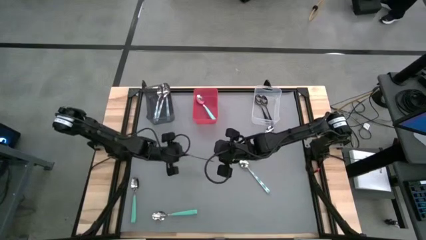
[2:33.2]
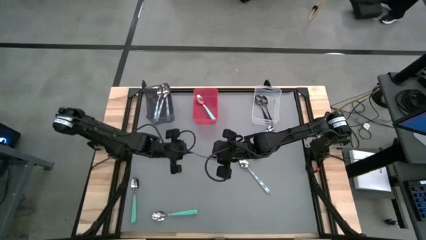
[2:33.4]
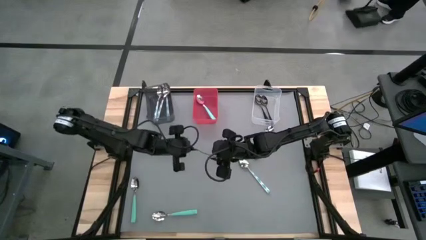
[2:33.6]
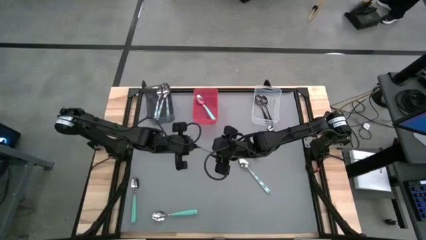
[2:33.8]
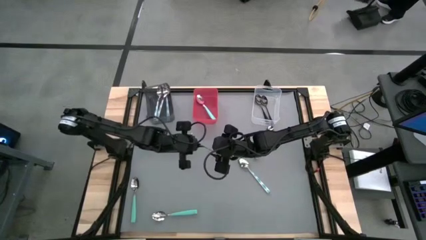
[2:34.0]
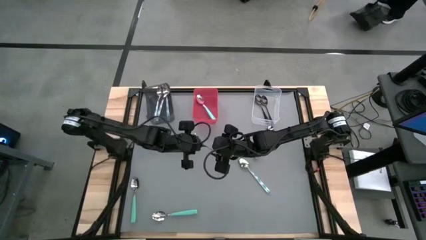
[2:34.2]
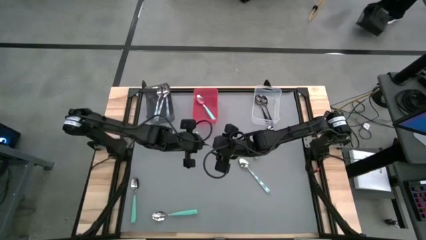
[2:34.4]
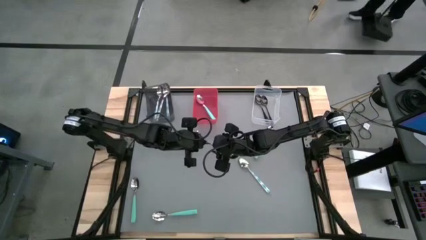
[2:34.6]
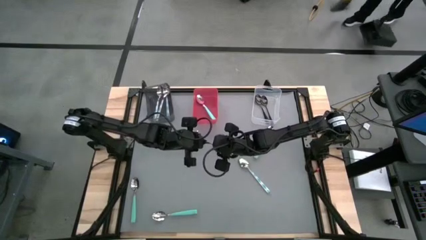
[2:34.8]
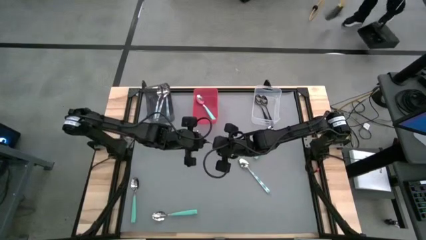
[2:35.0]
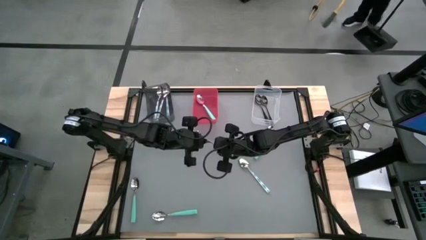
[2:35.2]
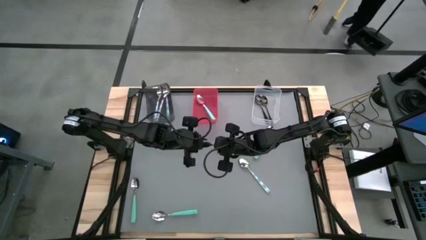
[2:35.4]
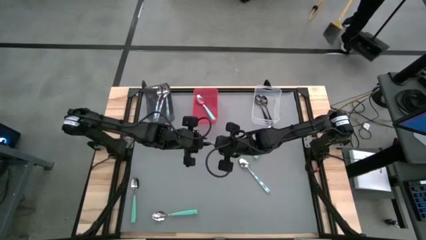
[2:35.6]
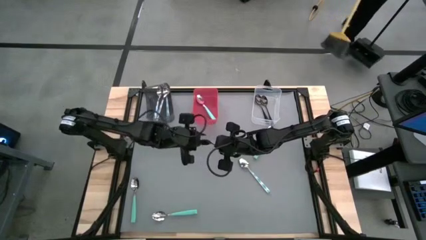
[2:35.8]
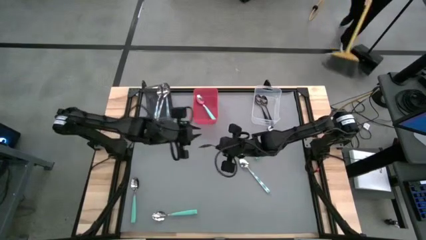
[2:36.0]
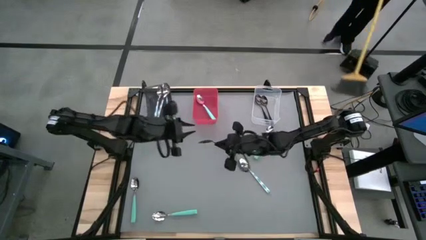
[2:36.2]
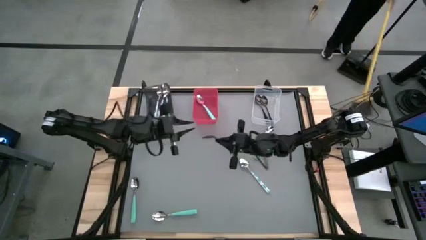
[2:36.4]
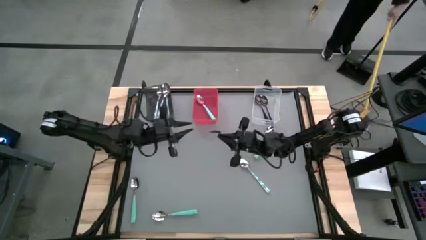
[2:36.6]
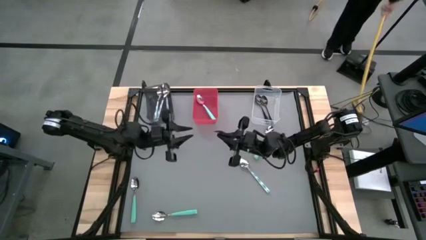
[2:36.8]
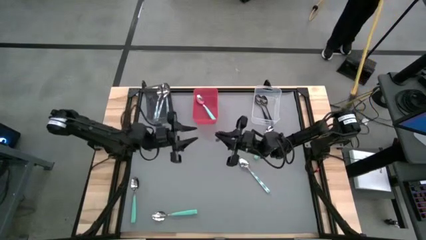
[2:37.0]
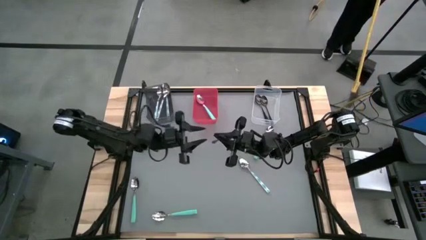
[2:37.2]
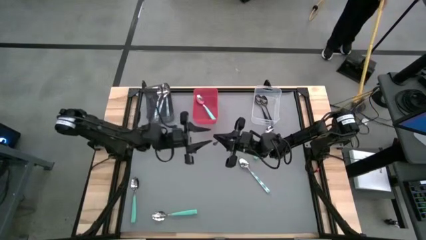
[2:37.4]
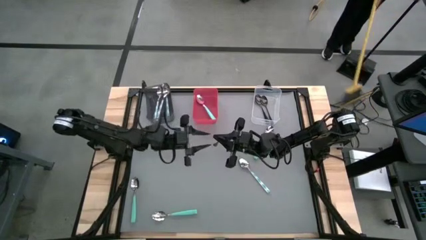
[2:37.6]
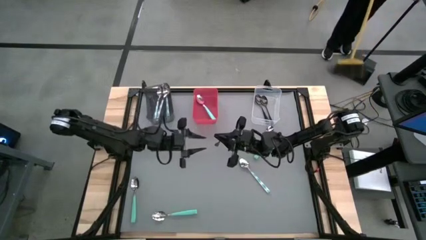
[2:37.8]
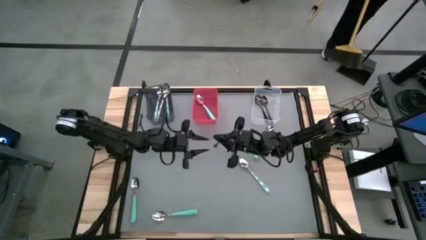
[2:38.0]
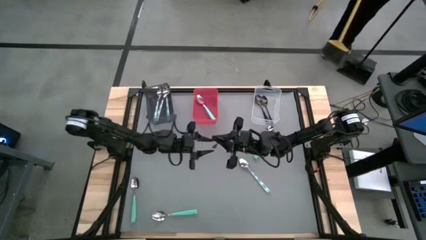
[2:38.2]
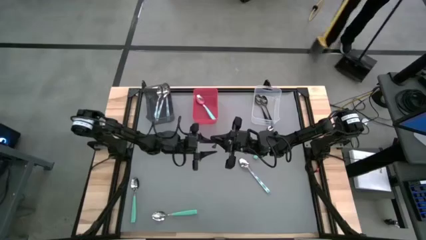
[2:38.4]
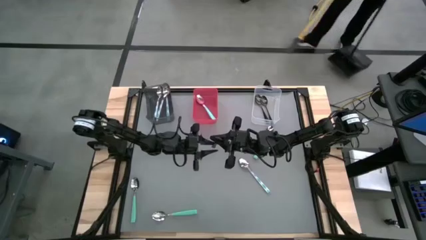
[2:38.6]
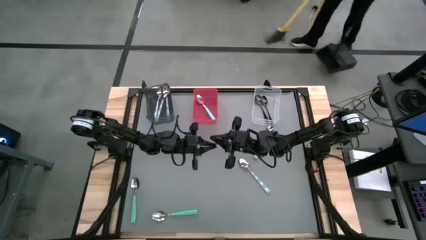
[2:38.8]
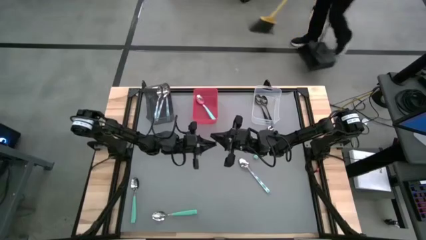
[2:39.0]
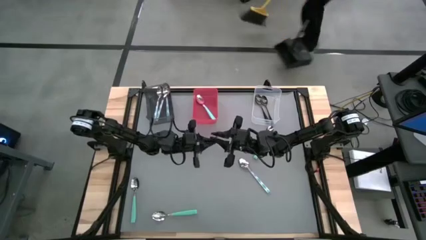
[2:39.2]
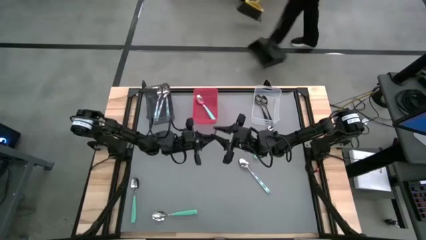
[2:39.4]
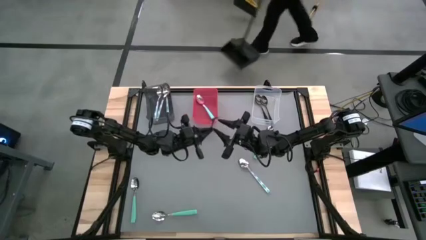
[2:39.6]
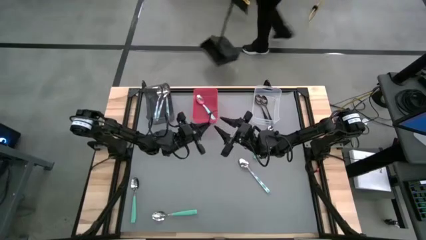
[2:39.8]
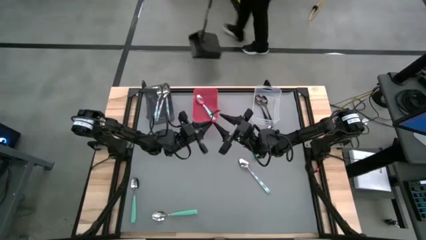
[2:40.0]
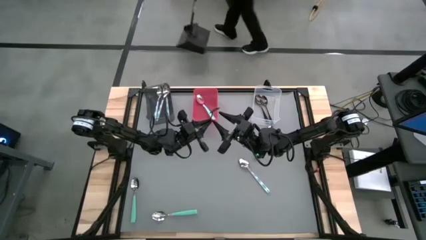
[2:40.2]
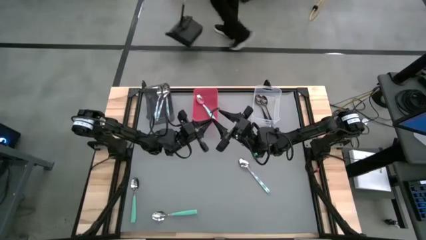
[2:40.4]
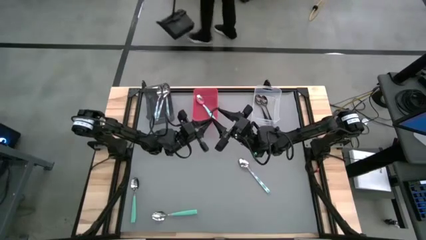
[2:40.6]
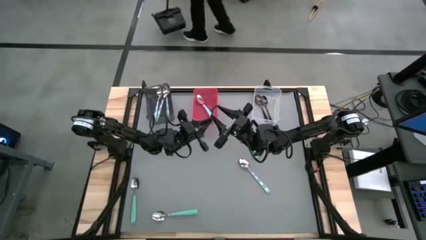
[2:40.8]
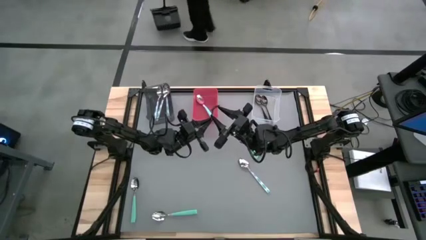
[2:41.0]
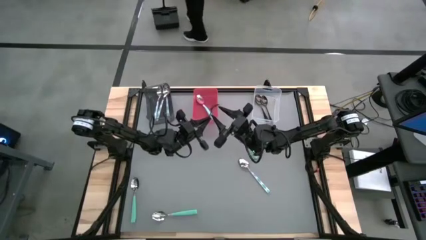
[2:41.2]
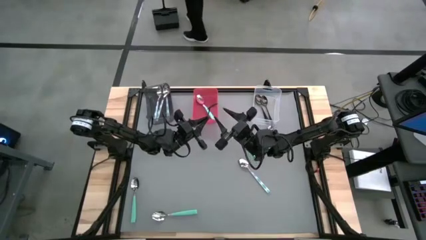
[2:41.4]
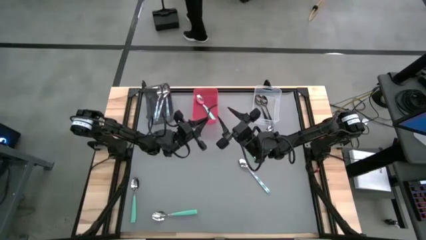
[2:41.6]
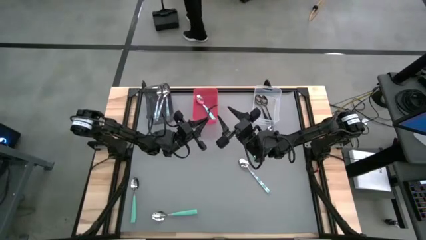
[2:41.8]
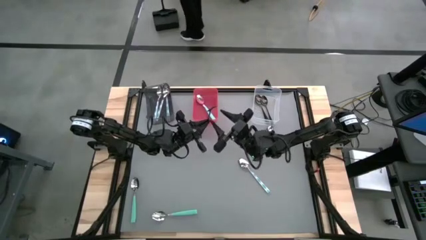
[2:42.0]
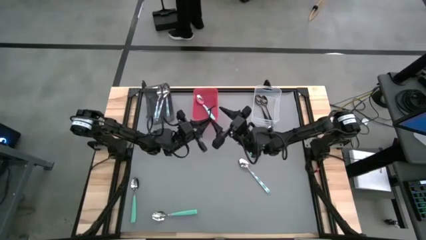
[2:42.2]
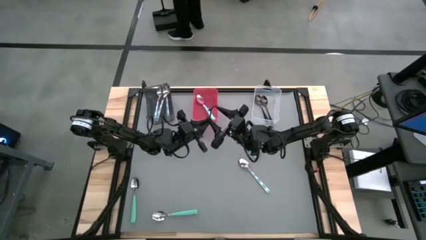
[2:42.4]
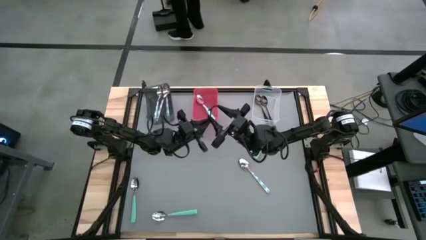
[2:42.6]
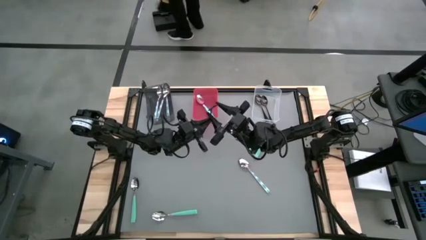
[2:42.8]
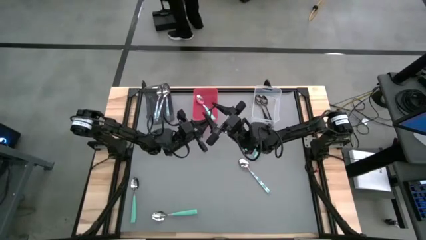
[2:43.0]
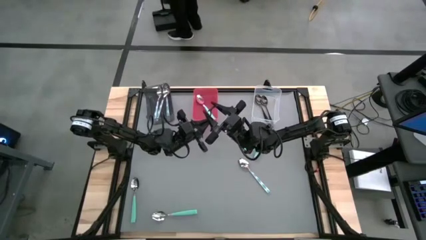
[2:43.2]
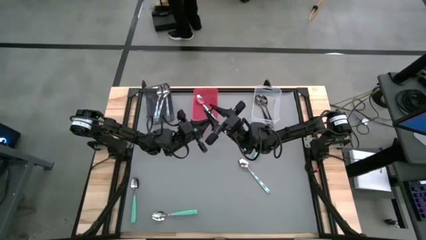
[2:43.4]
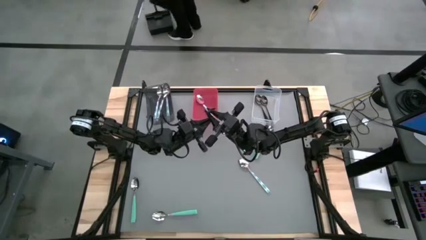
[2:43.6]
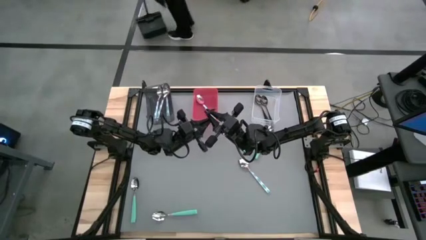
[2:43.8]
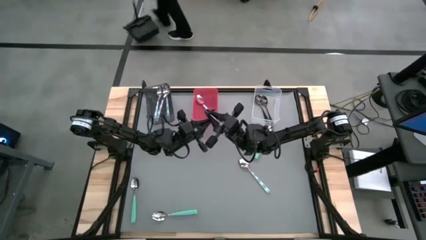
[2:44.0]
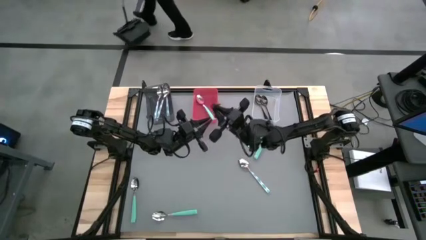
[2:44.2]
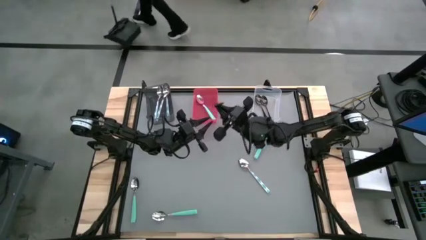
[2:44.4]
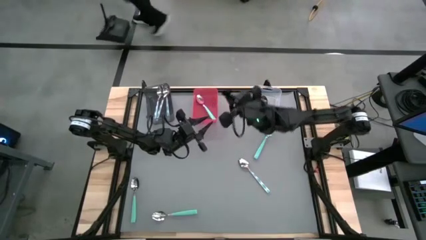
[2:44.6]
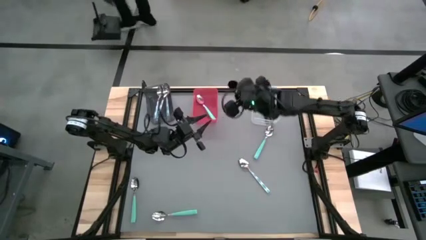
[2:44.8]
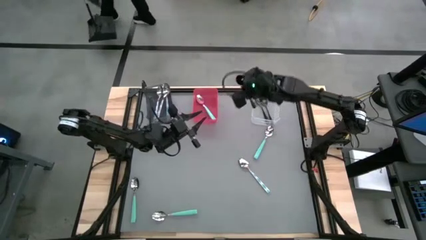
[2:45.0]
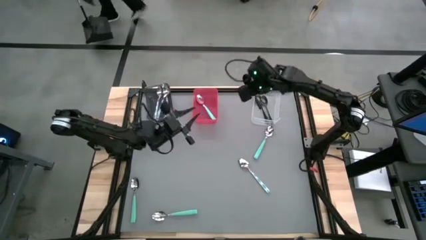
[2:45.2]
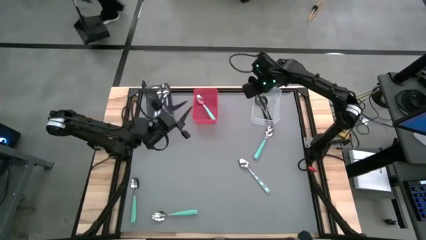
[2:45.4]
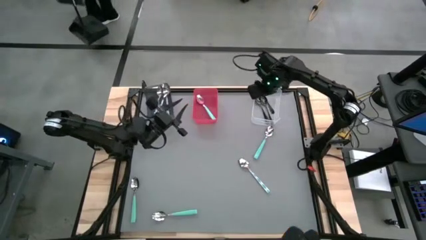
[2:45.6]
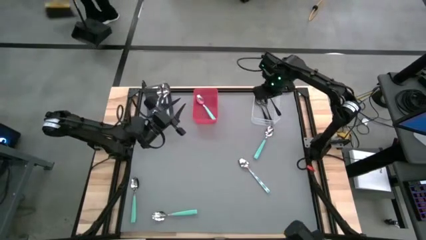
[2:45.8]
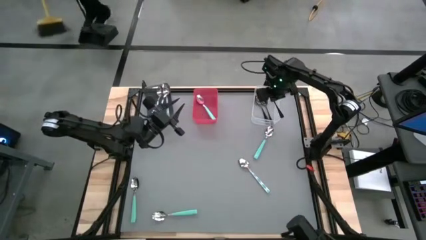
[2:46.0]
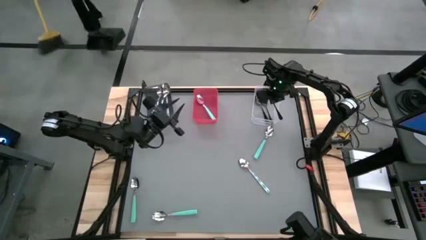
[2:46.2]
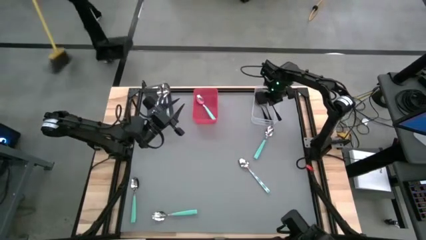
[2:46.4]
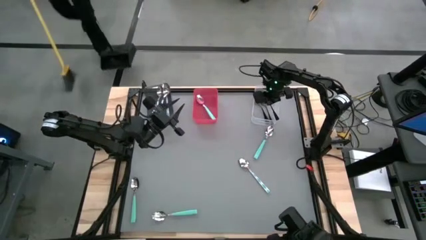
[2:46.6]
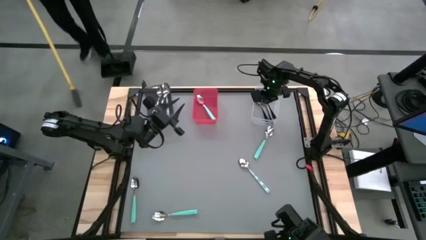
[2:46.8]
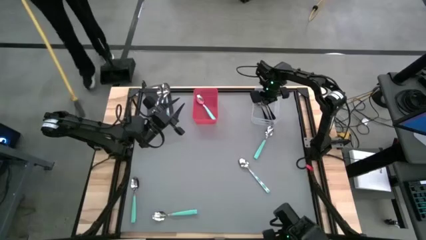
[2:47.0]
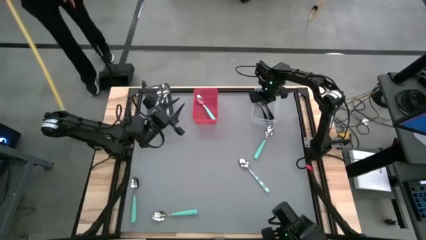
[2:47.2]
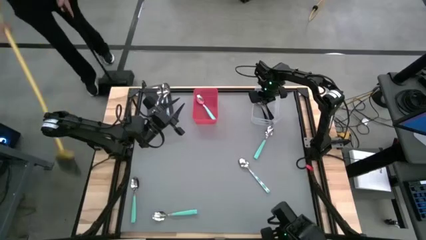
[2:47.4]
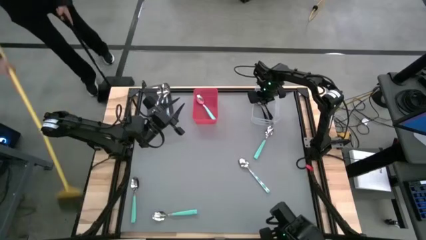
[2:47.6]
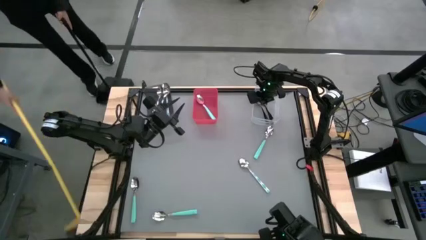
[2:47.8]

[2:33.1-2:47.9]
Task: Sort silverware by color (type)
Put the black spoon into the transparent bin
